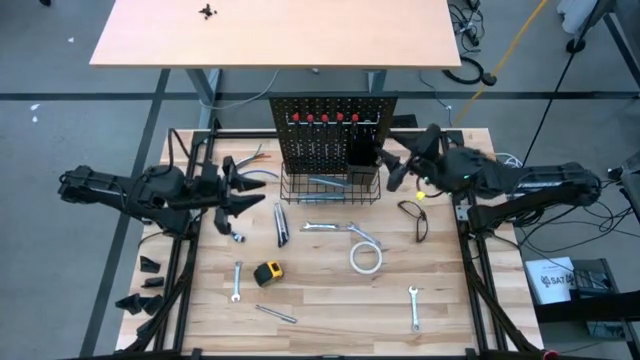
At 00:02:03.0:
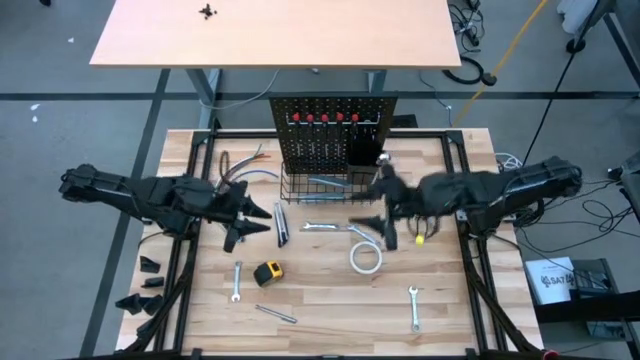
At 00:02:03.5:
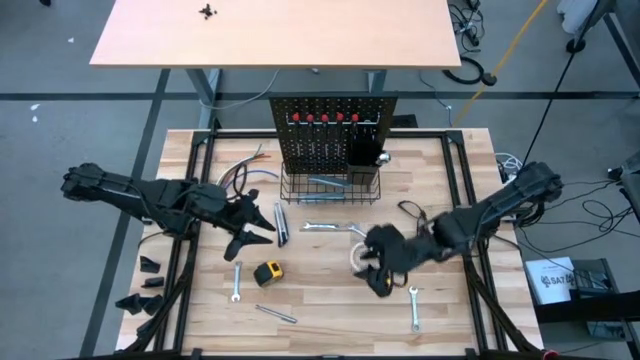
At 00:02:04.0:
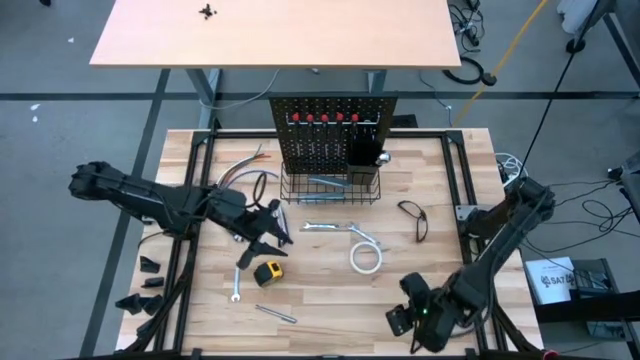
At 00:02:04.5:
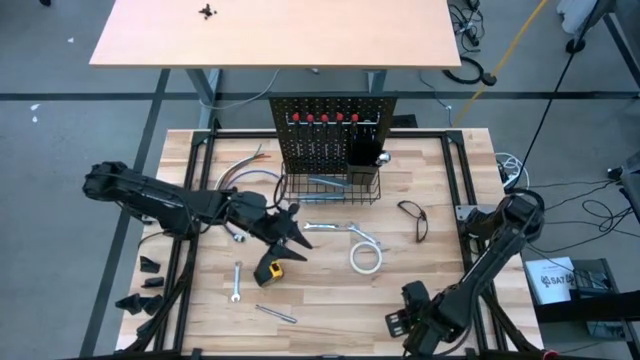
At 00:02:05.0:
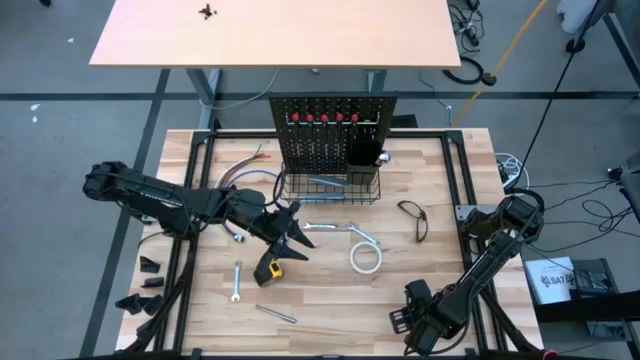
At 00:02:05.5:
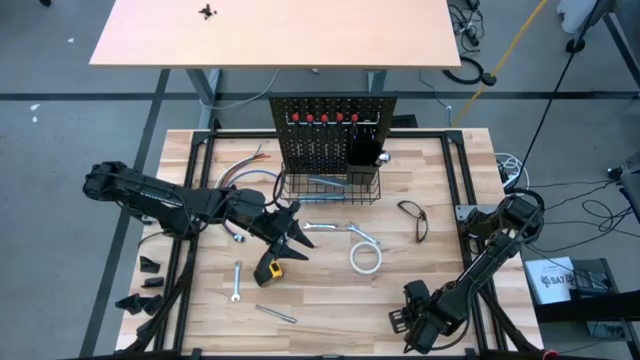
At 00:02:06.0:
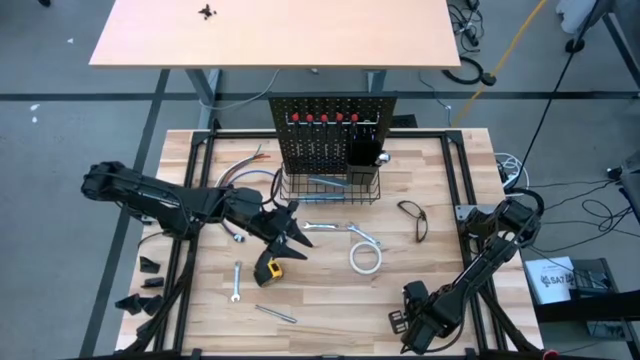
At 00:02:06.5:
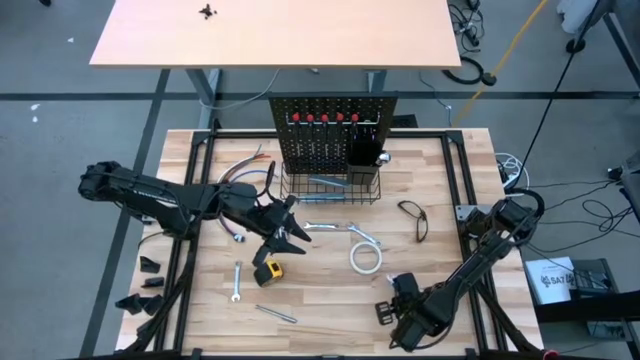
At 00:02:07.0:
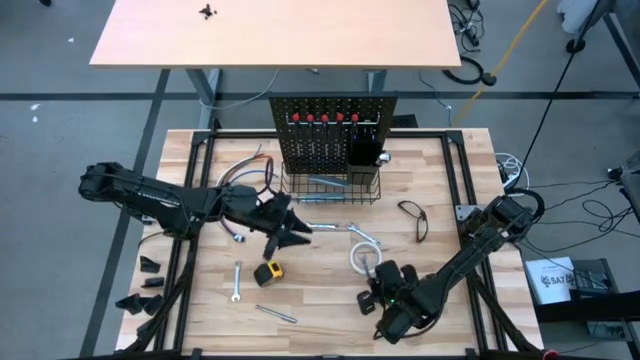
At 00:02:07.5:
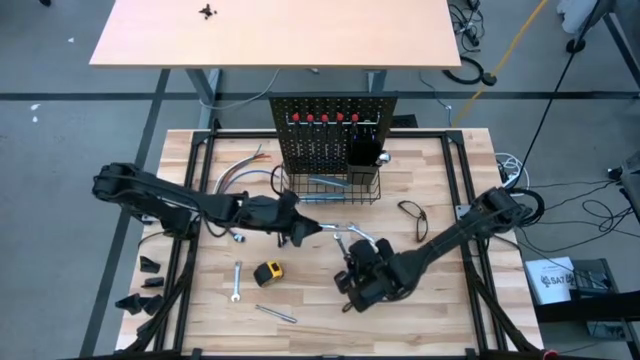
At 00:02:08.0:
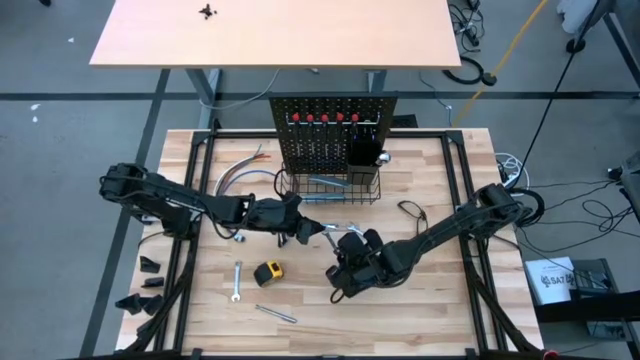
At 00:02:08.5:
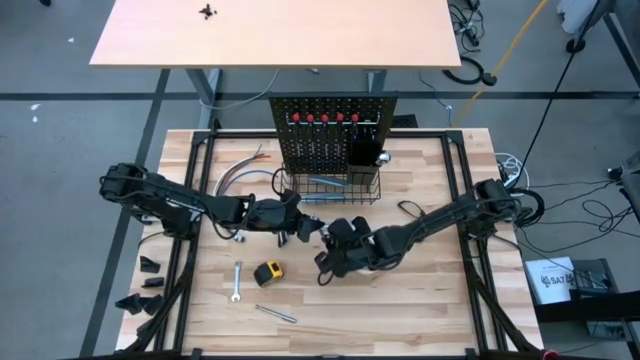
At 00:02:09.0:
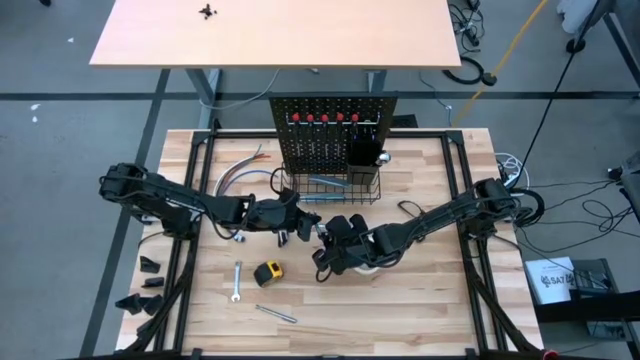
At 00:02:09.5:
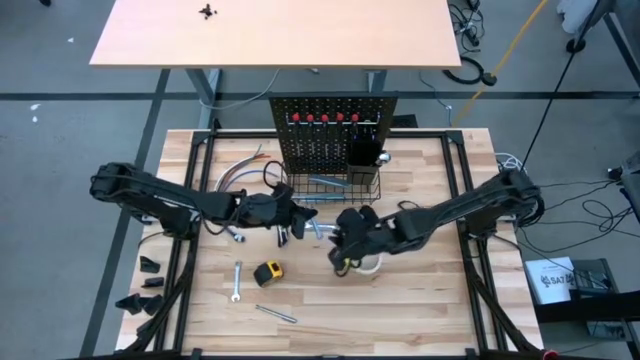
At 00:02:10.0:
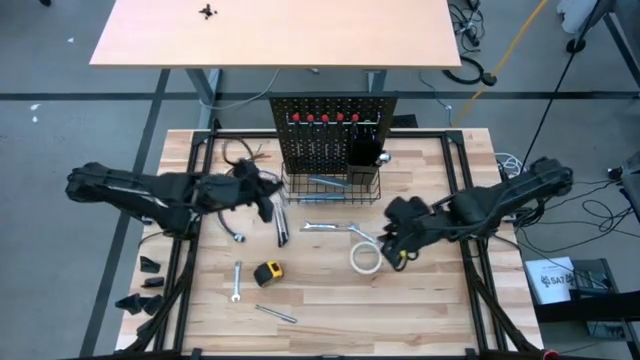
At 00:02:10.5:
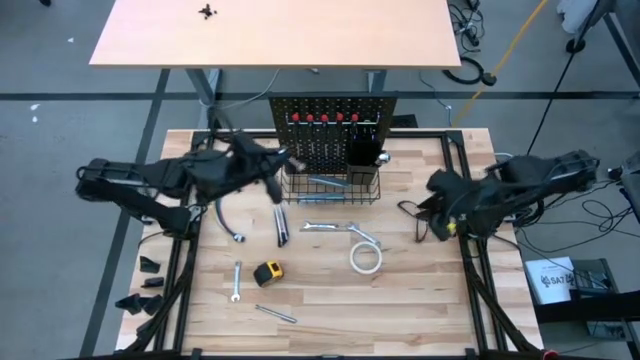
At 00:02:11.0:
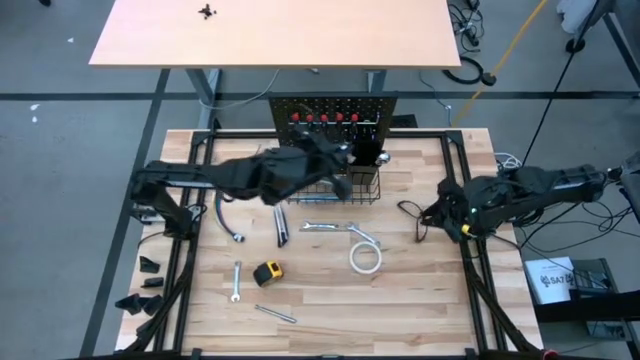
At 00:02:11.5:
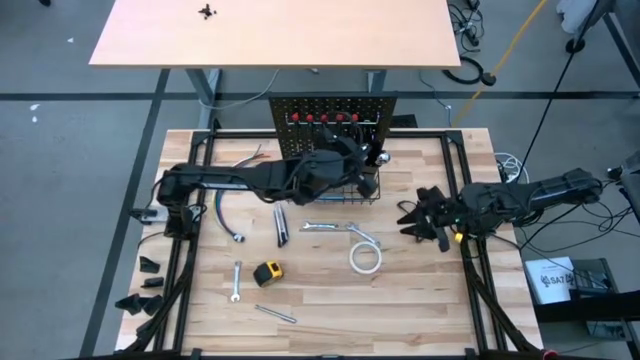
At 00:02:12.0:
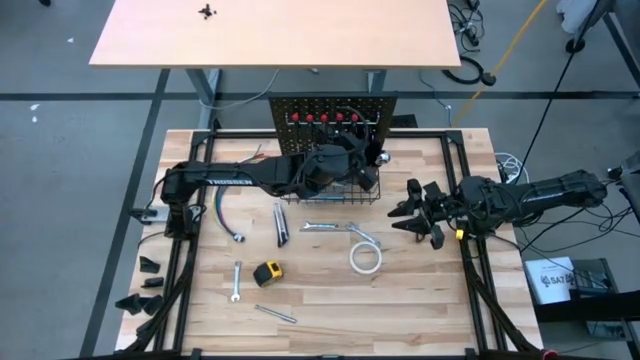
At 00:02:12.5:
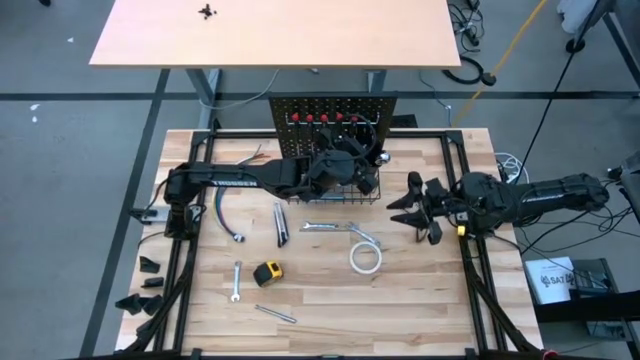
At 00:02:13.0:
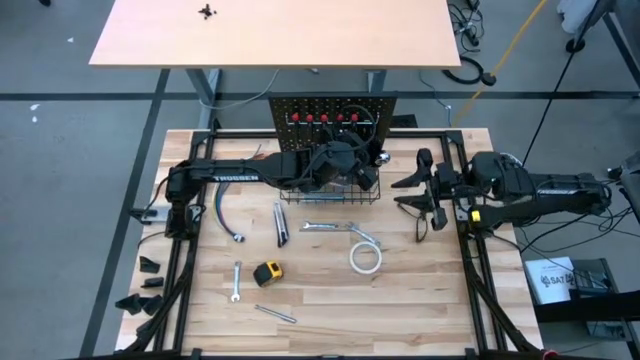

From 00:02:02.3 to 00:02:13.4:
Task: Hang tools onto peg board
Put the wrench into the pegboard bin

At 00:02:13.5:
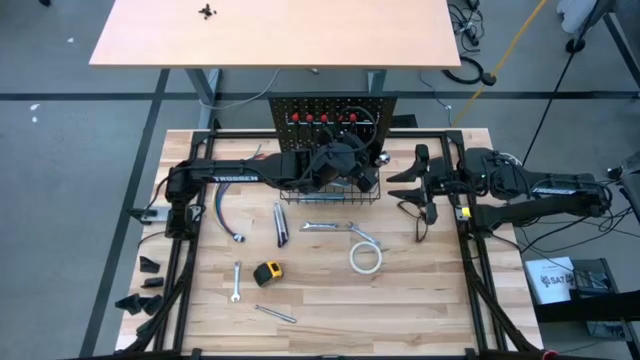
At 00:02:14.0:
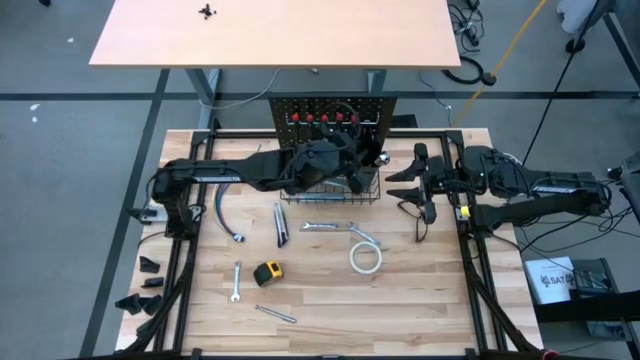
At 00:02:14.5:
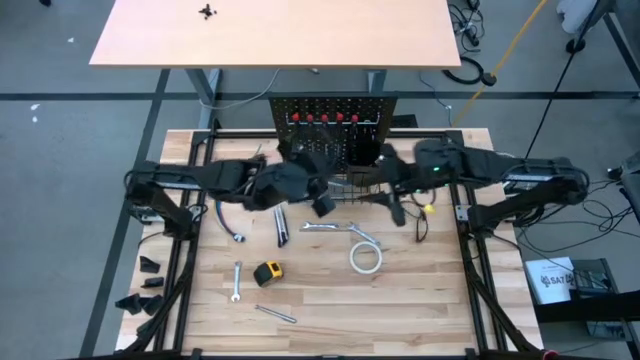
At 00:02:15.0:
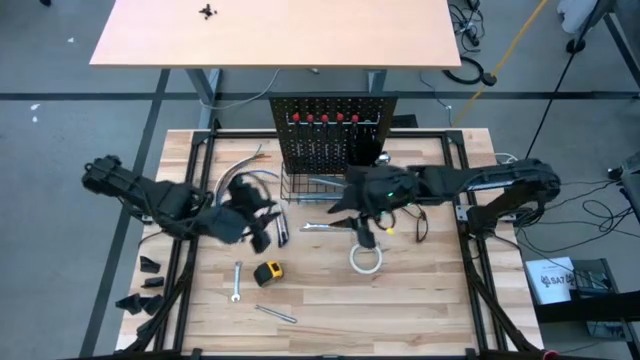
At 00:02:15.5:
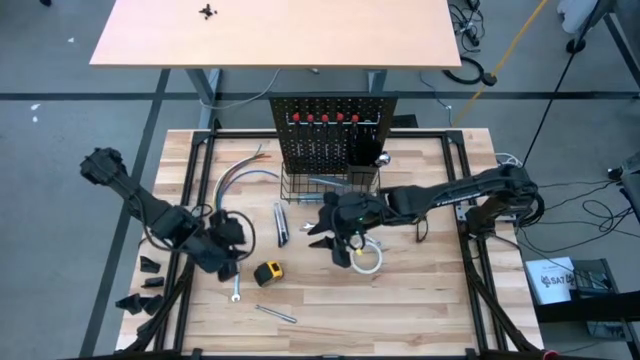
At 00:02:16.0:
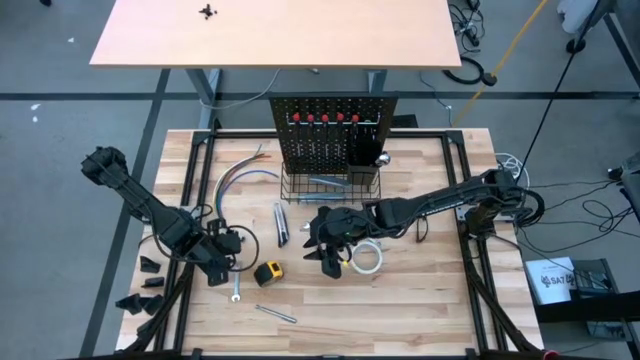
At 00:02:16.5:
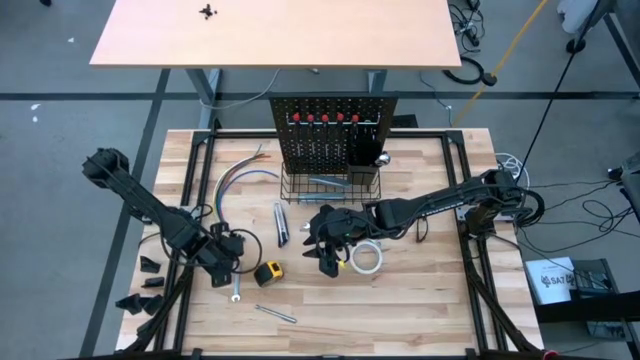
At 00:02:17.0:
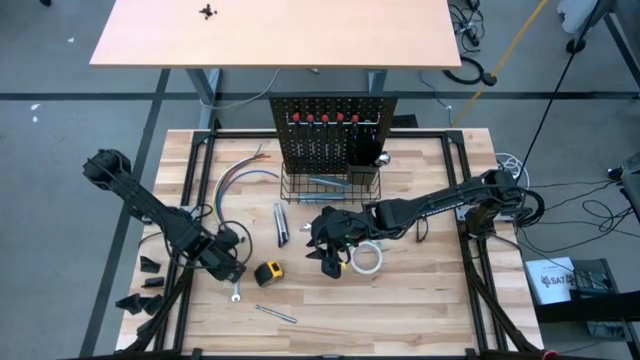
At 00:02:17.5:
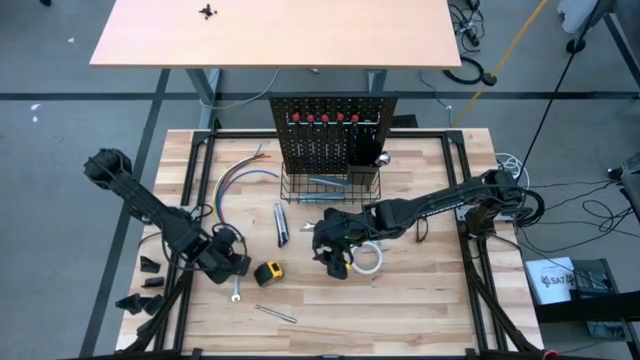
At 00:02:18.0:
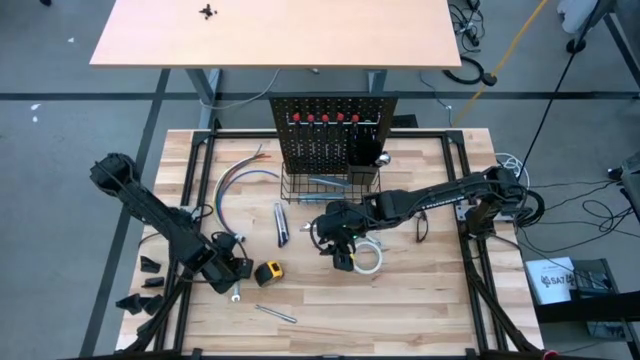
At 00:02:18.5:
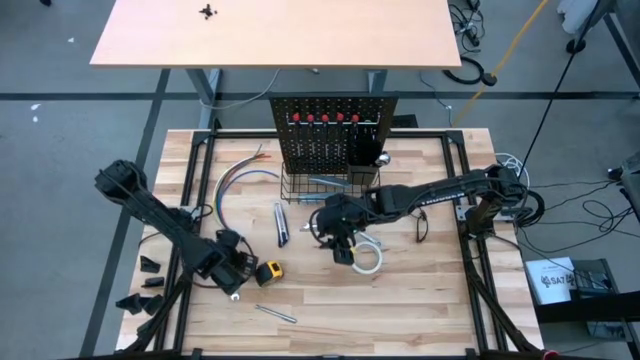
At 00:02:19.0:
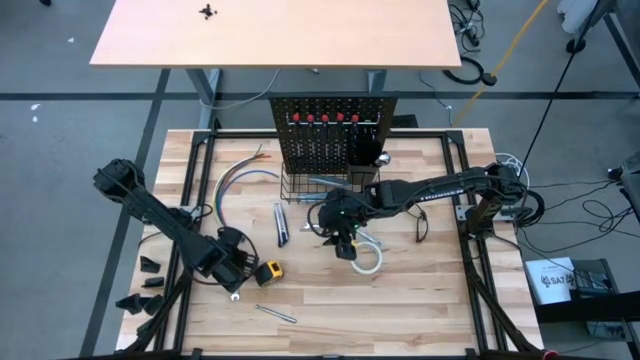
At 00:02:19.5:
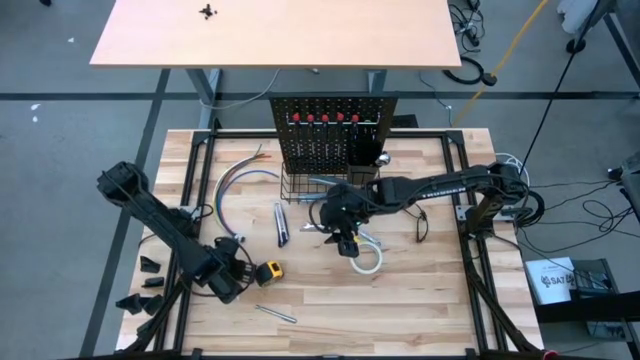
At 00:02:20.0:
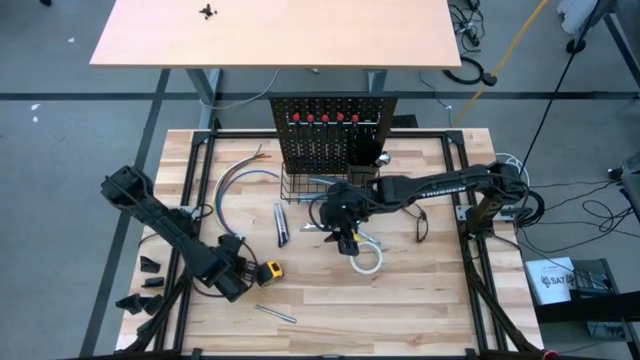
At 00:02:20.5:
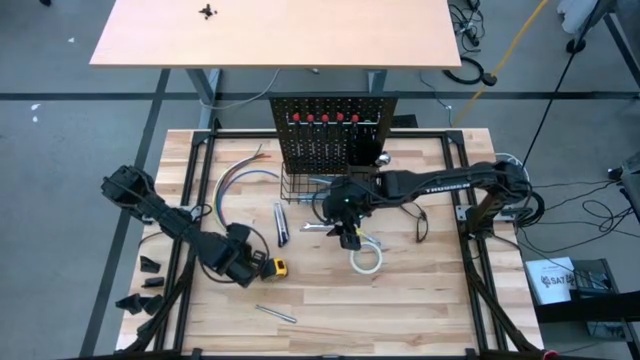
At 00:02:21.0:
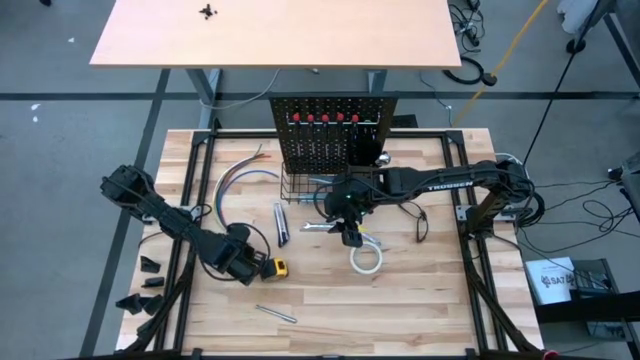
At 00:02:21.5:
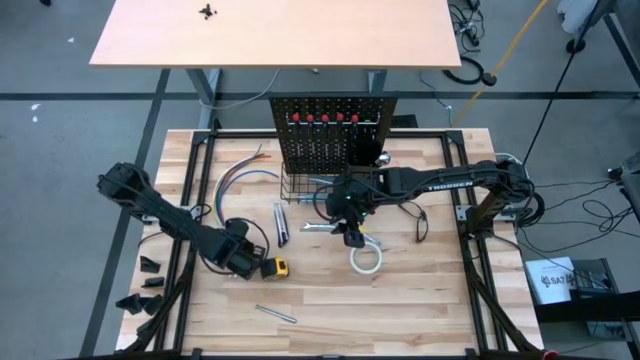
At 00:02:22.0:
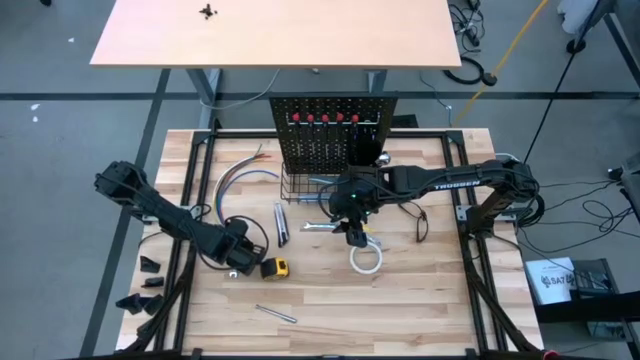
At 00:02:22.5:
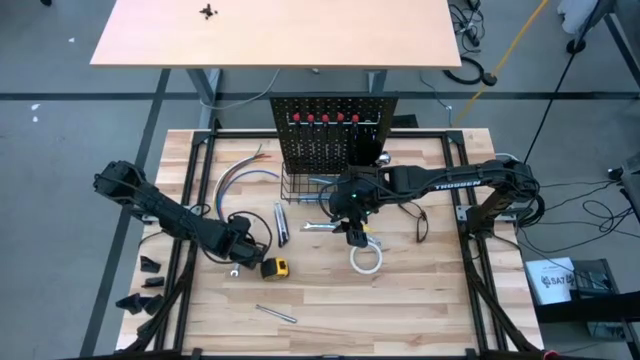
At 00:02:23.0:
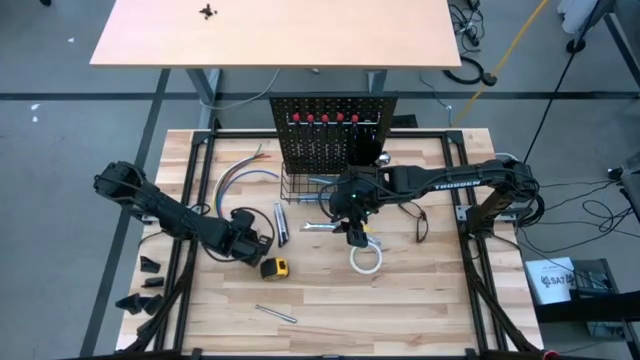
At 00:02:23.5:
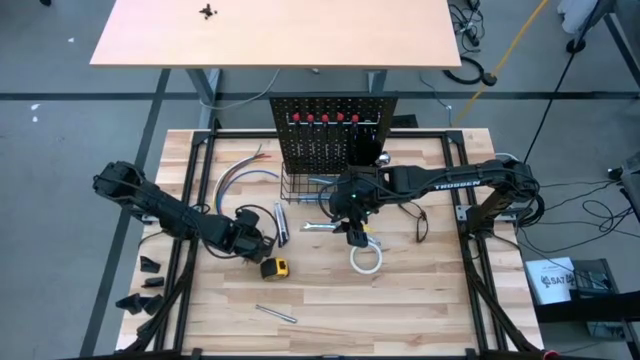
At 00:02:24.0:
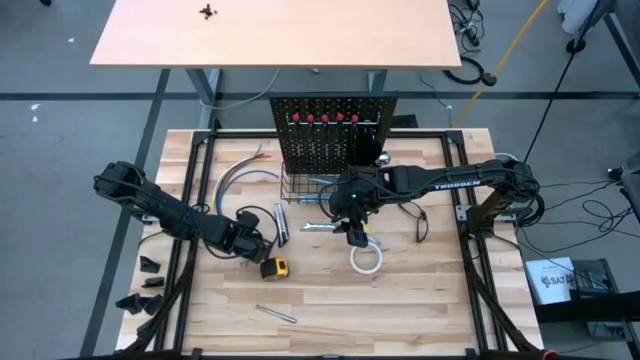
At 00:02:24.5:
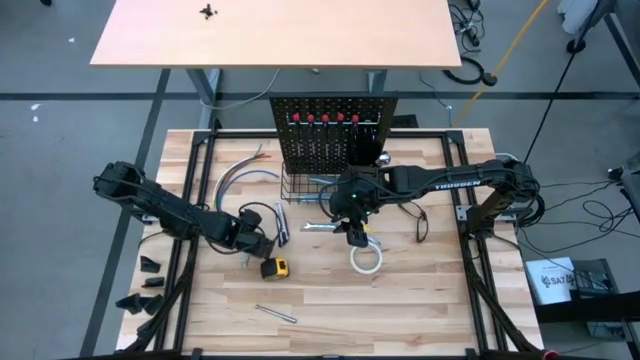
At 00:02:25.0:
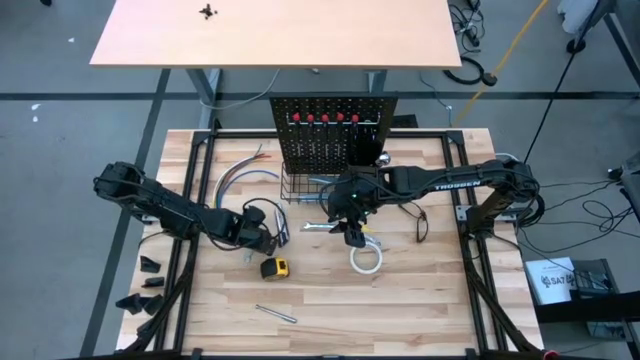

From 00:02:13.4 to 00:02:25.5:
Put the wrench into the pegboard bin
